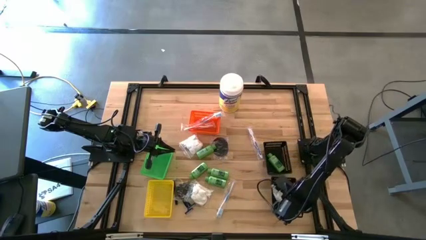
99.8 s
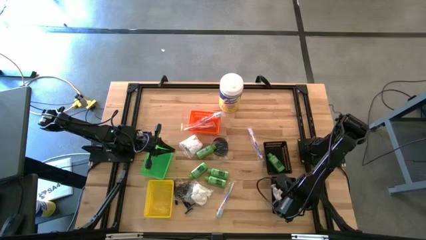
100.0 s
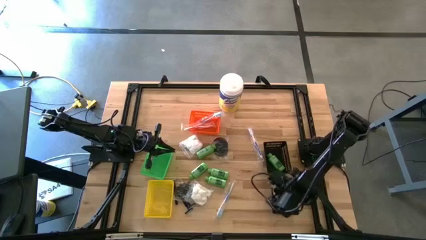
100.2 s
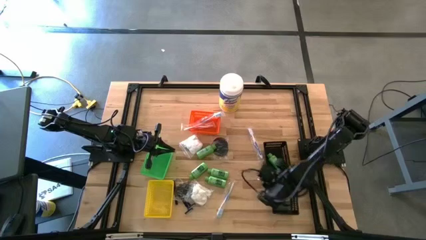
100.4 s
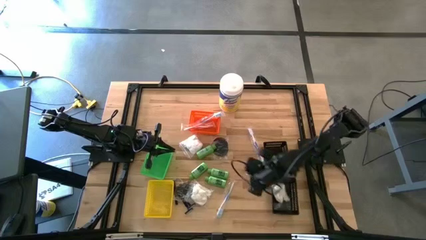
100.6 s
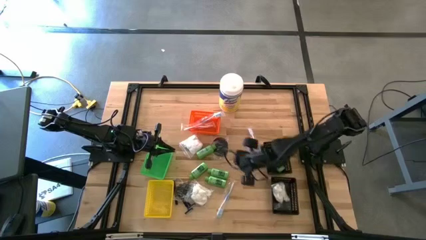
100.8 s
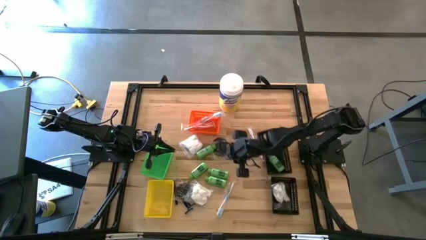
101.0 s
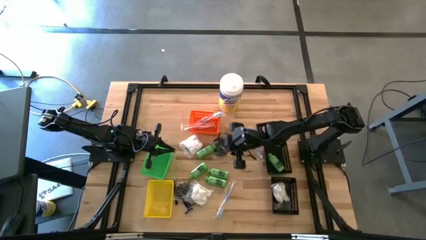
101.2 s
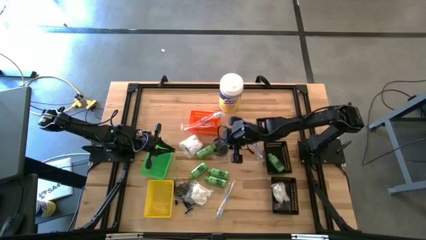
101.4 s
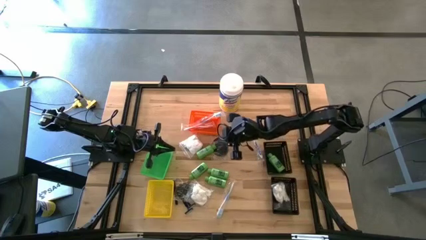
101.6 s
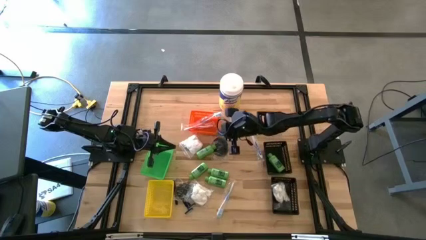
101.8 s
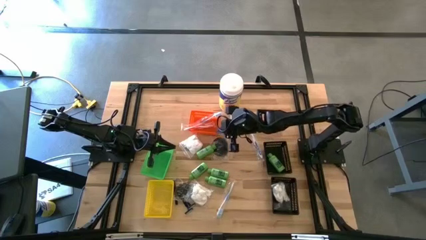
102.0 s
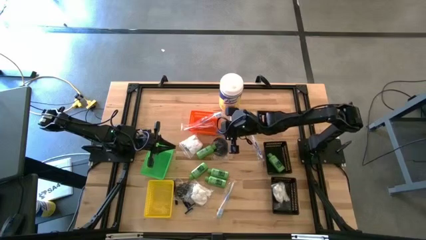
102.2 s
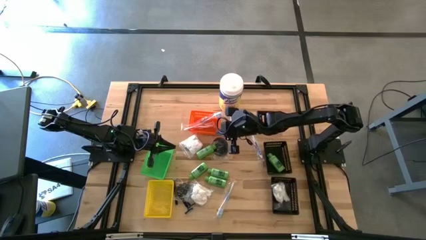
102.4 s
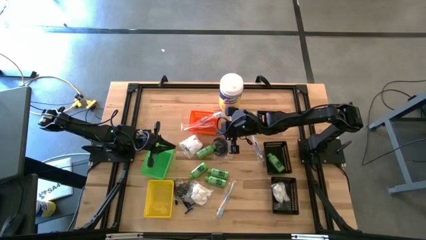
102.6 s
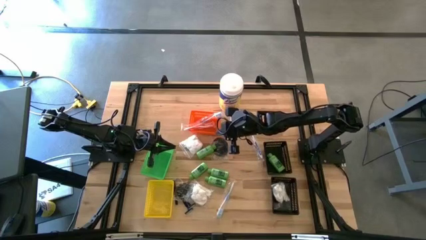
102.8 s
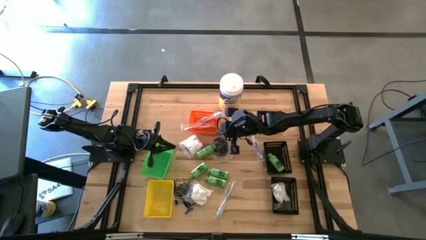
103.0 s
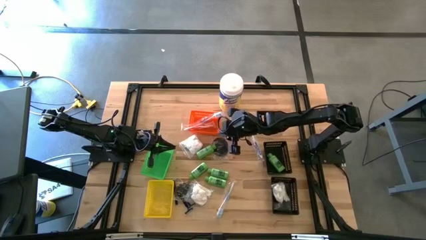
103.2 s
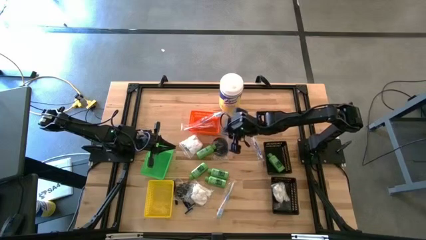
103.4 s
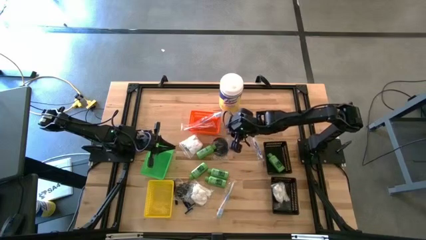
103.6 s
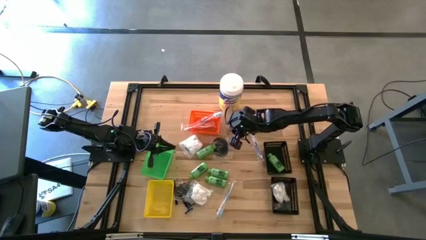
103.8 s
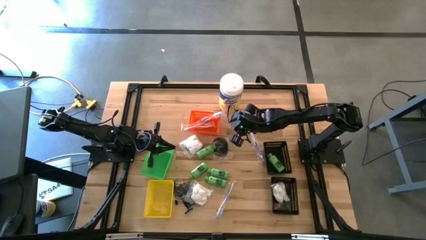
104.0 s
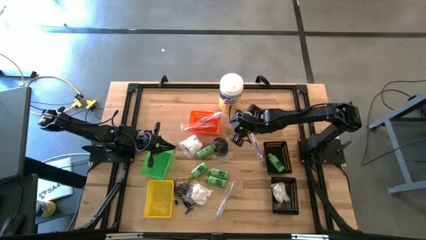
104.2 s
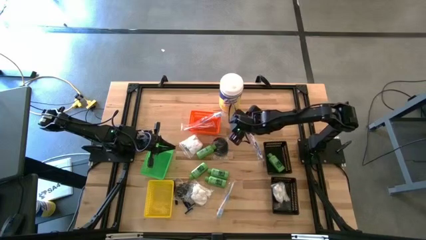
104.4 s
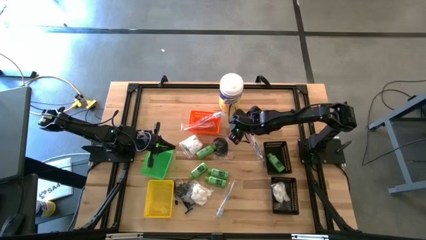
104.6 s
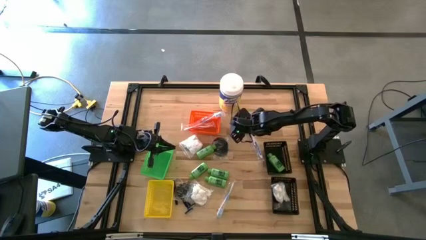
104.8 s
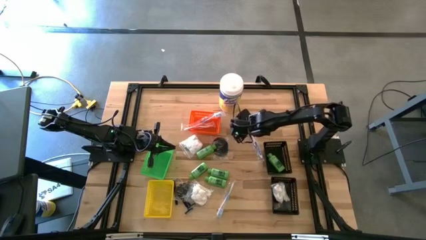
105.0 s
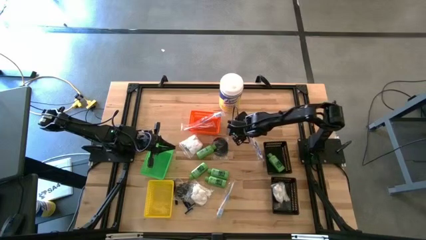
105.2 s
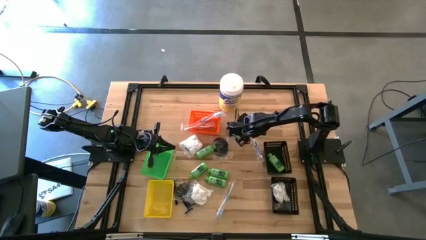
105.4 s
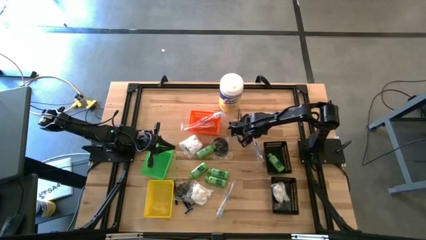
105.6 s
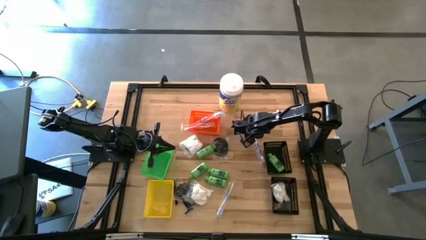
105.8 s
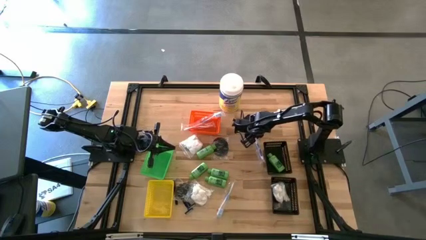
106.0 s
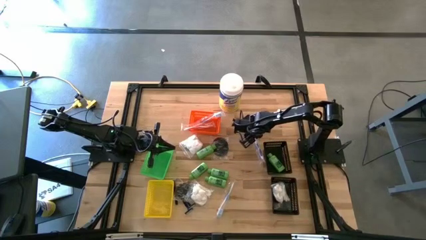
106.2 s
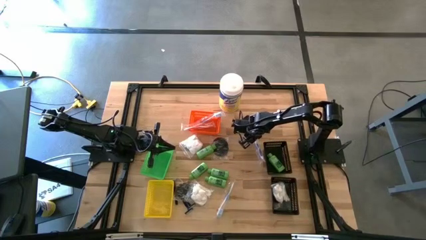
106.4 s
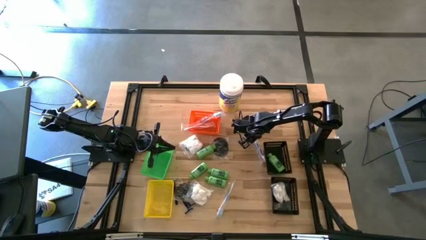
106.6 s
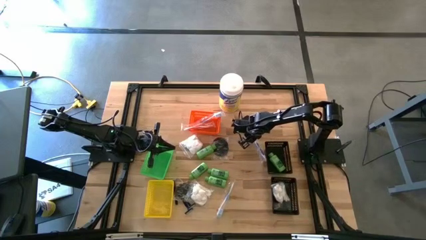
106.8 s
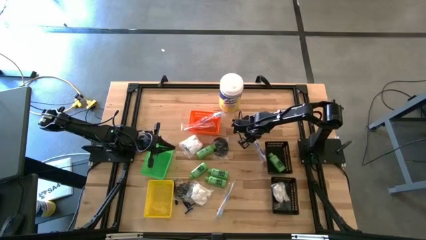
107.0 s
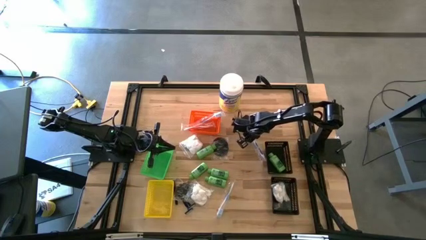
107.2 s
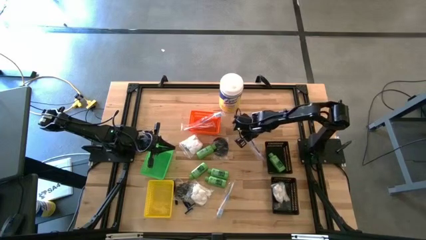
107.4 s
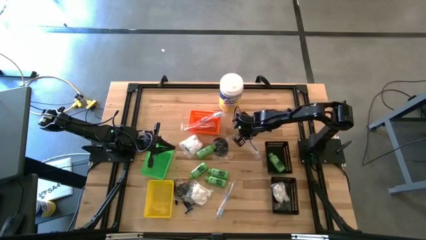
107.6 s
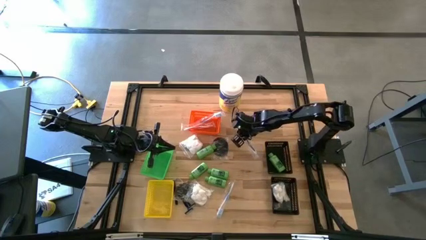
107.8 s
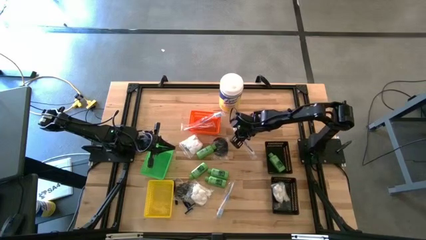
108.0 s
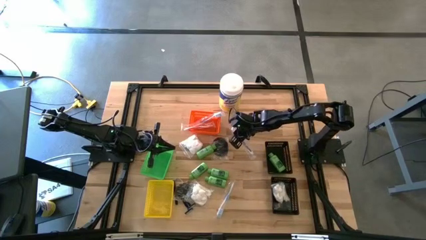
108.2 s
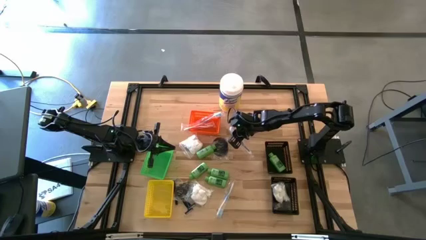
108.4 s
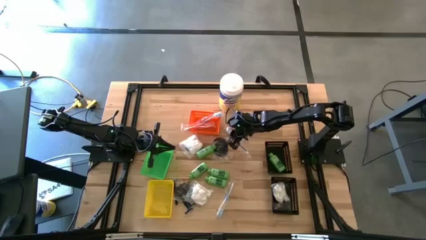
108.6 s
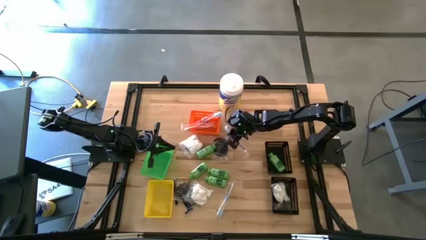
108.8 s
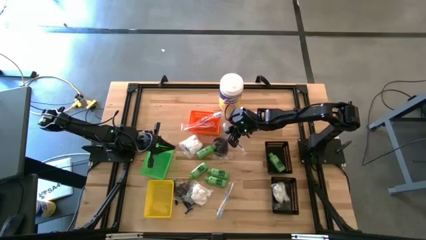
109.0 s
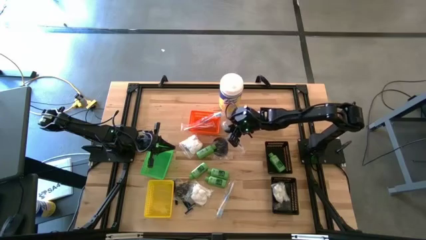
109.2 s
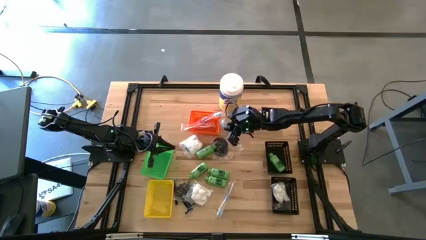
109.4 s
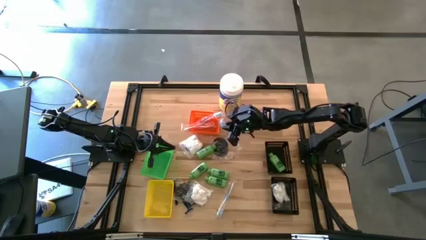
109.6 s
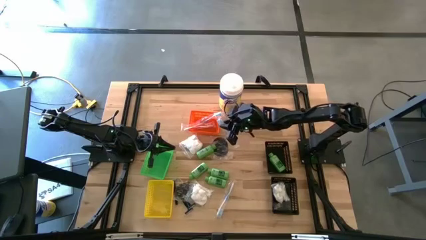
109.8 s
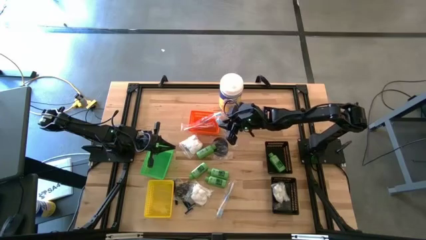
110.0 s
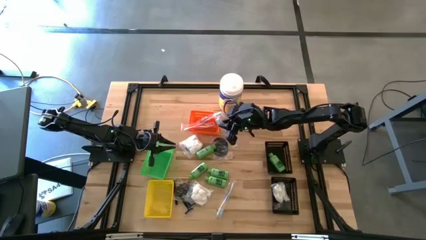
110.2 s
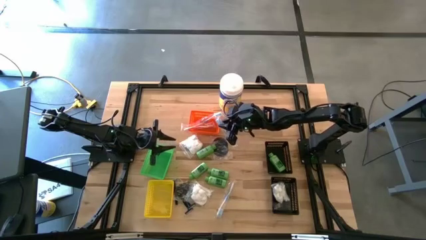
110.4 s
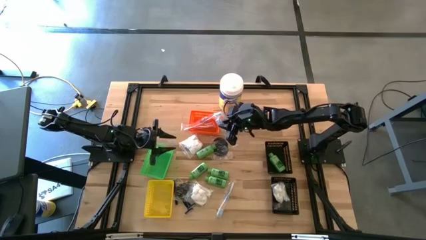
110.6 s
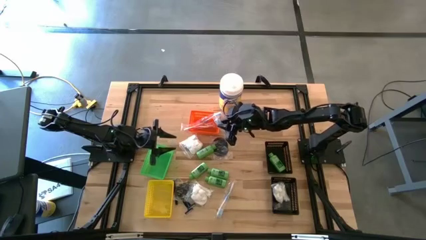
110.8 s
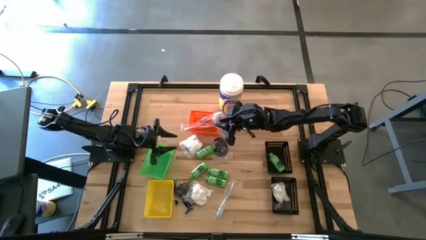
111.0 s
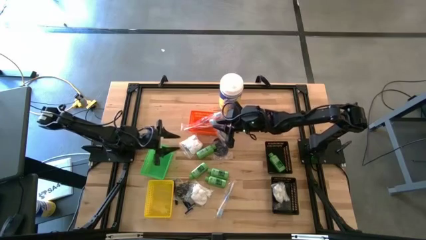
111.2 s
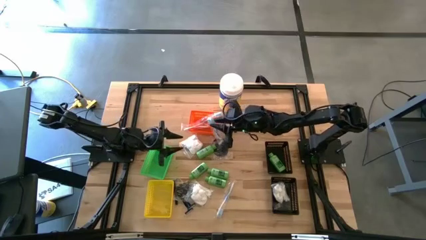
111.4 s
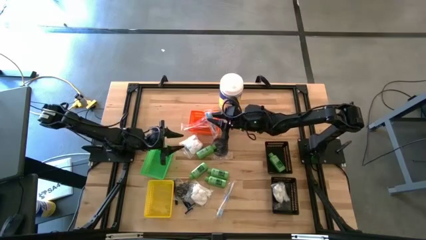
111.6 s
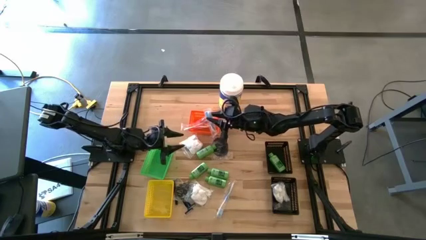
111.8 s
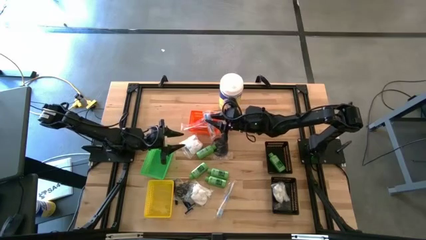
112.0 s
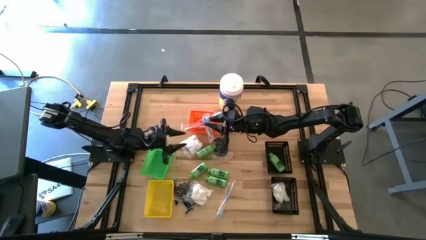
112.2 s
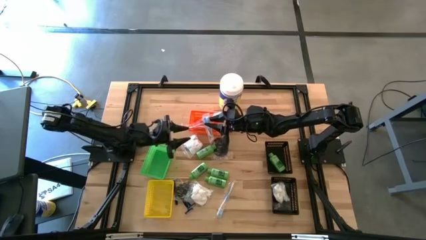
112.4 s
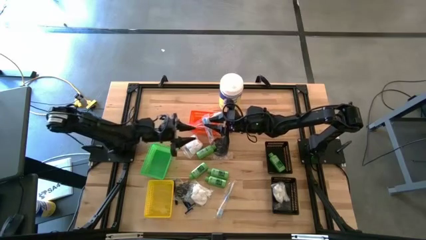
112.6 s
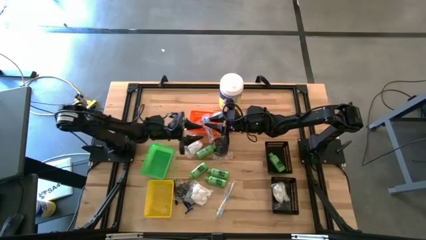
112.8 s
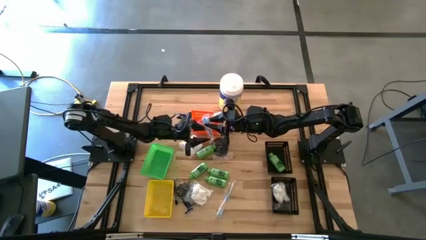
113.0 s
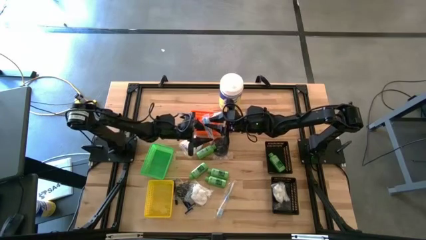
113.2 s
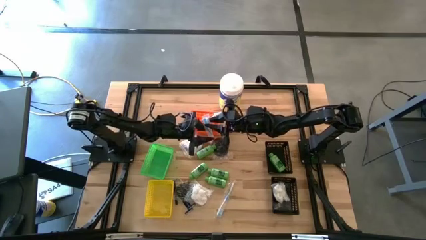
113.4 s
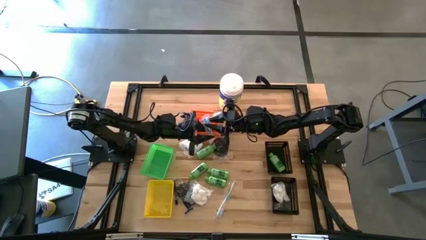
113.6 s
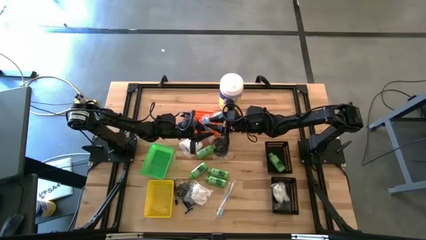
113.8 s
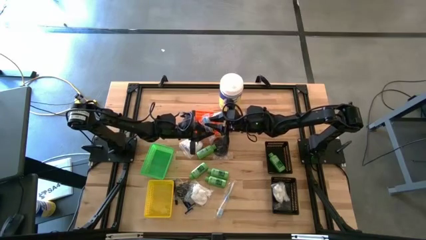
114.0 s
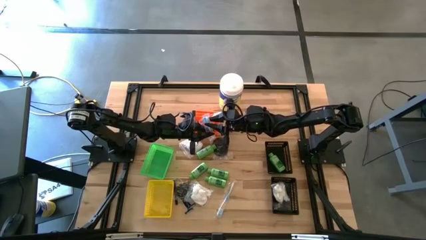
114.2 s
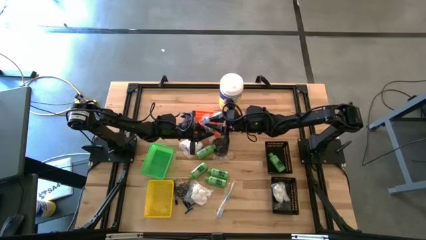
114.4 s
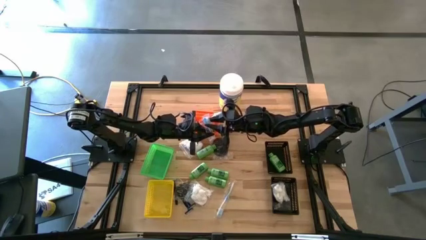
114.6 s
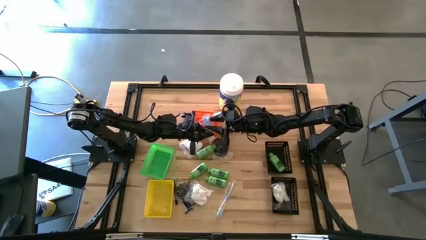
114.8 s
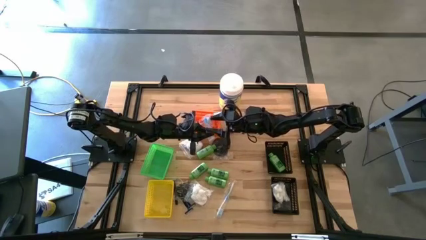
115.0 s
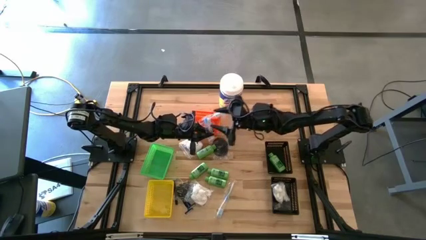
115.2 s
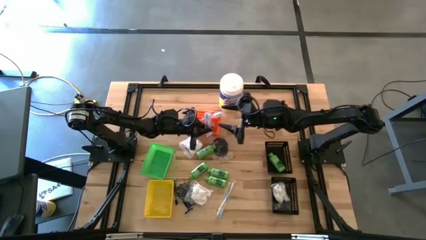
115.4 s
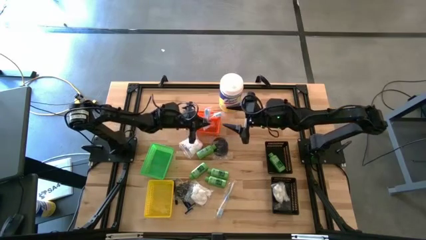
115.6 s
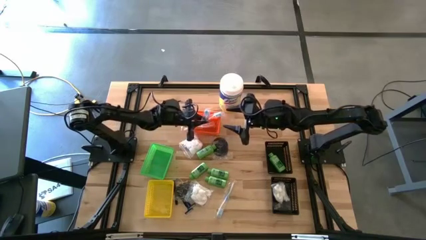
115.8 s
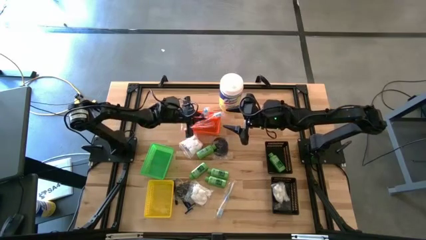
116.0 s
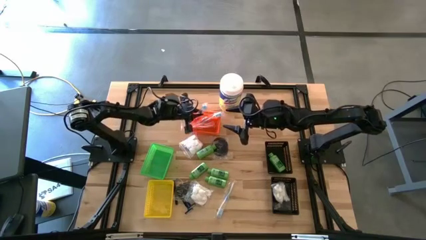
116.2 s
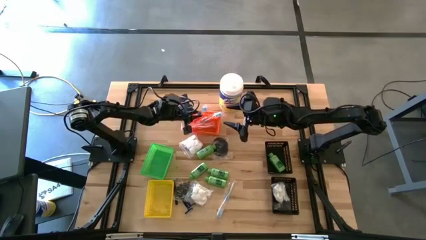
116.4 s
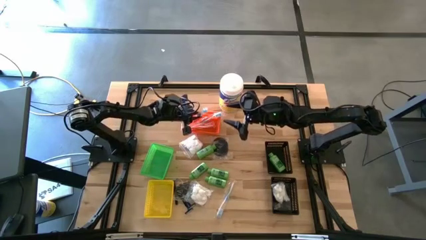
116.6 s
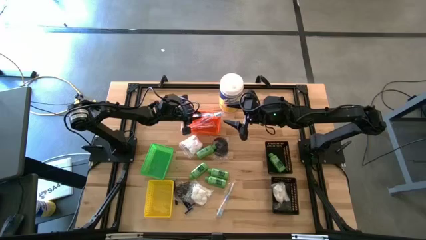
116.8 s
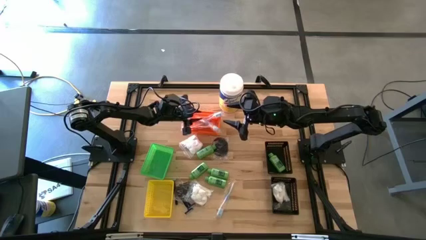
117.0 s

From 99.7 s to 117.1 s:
Task: Pick & Place Travel size toiletries
Put the blue toothbrush into the orange bin
